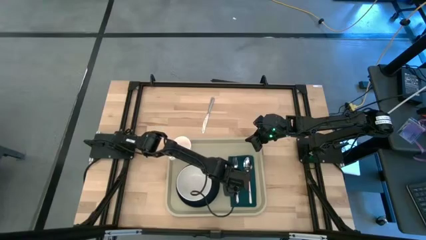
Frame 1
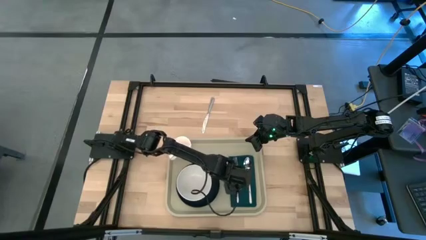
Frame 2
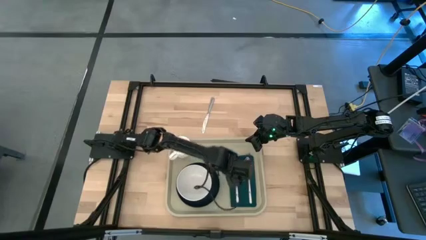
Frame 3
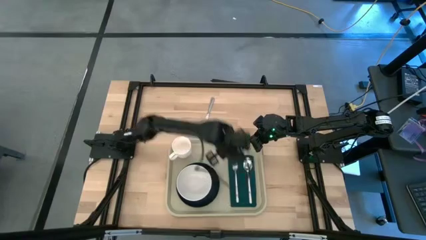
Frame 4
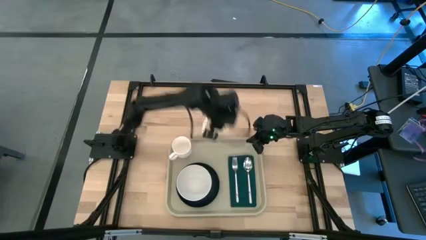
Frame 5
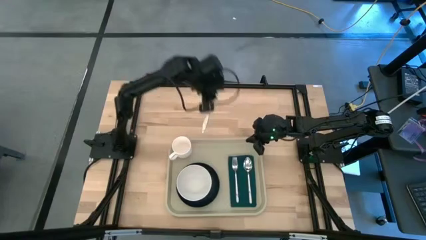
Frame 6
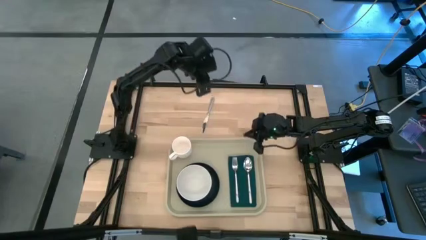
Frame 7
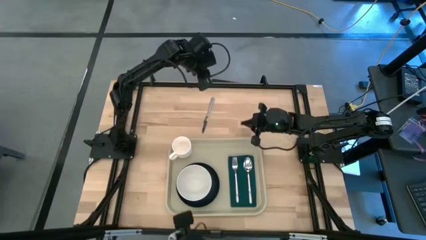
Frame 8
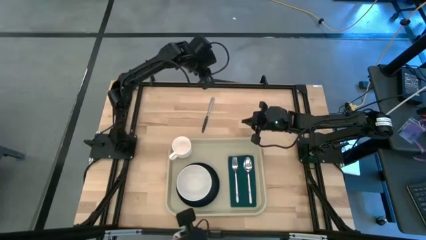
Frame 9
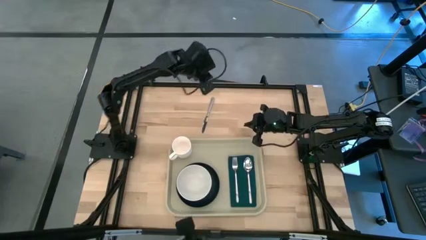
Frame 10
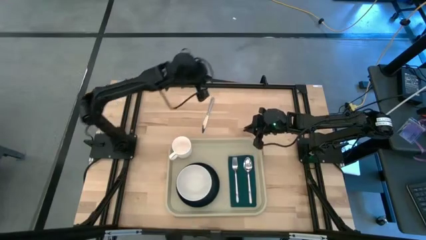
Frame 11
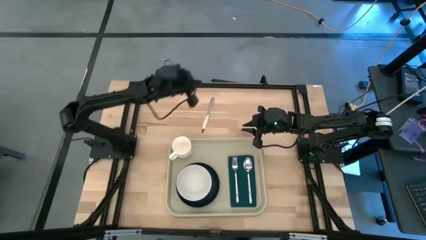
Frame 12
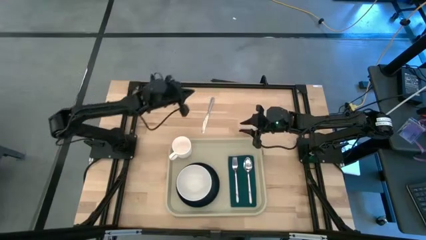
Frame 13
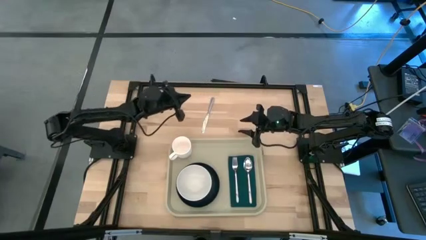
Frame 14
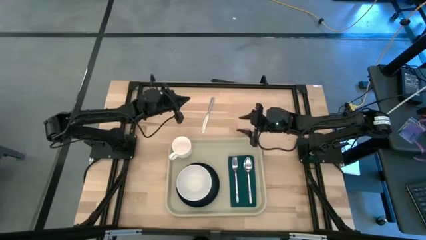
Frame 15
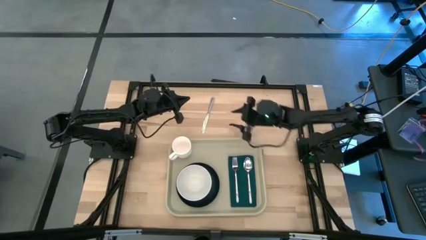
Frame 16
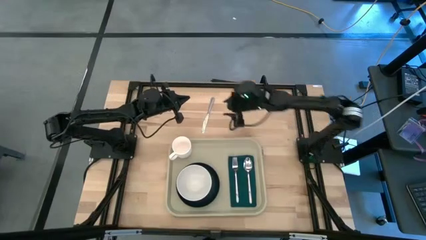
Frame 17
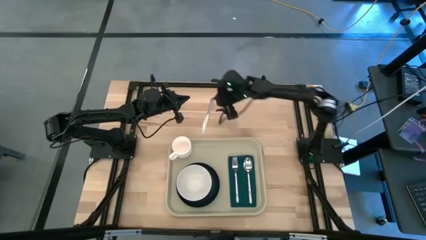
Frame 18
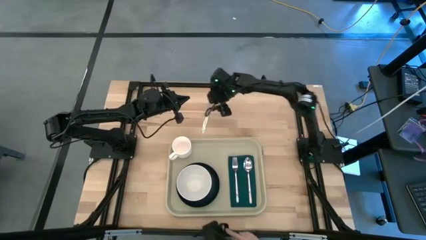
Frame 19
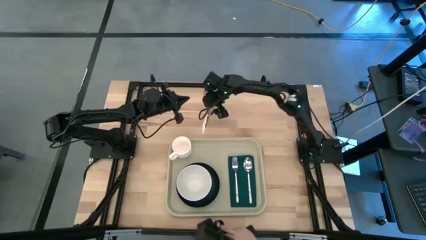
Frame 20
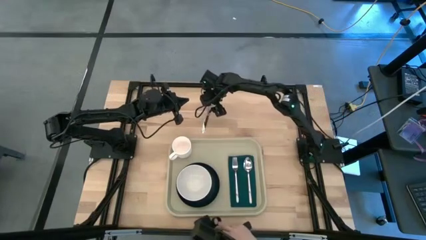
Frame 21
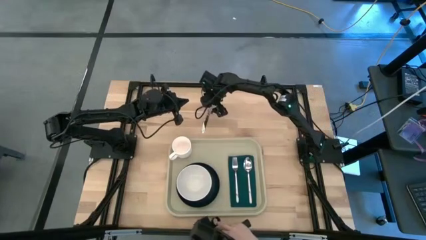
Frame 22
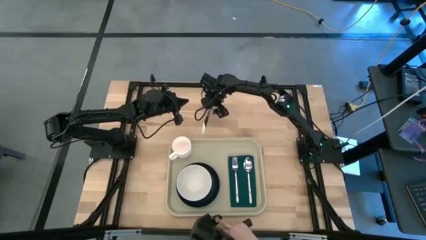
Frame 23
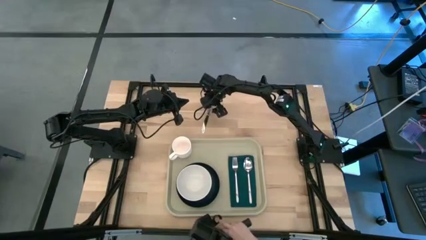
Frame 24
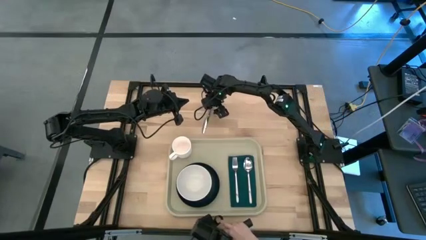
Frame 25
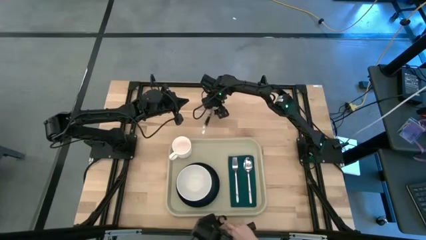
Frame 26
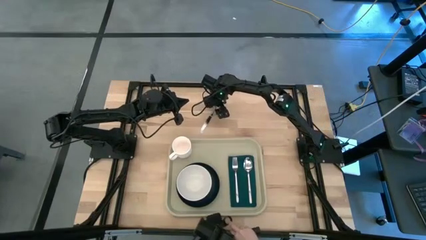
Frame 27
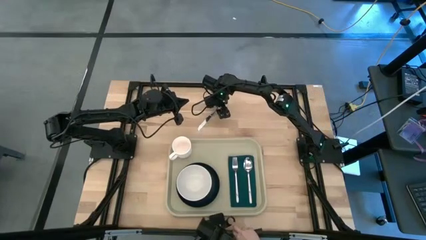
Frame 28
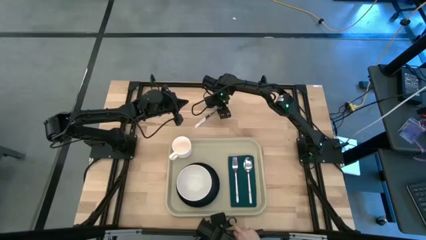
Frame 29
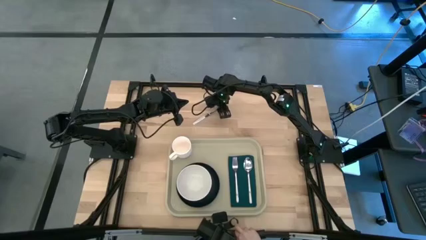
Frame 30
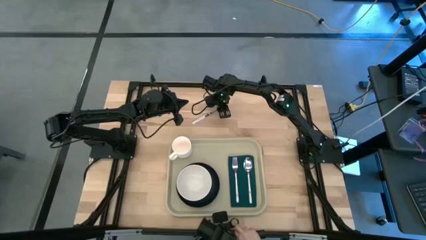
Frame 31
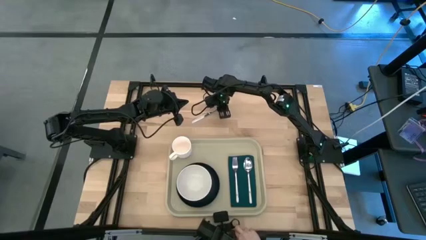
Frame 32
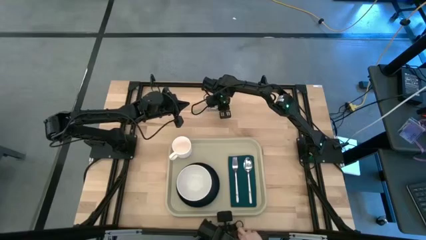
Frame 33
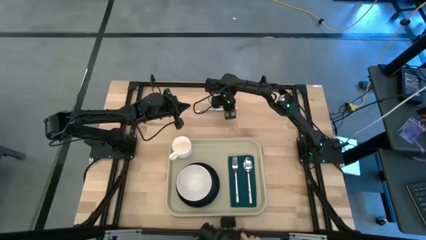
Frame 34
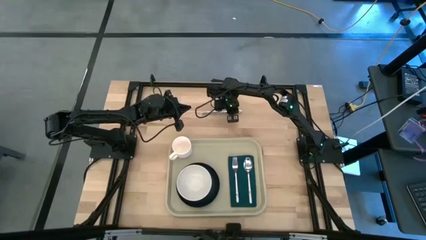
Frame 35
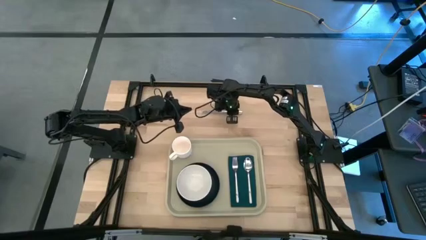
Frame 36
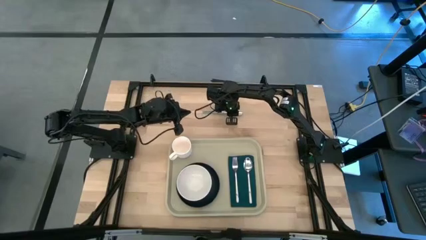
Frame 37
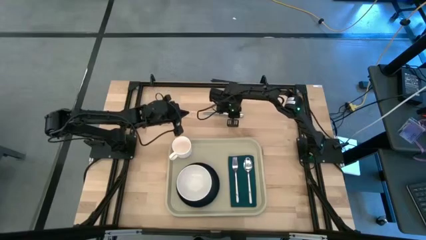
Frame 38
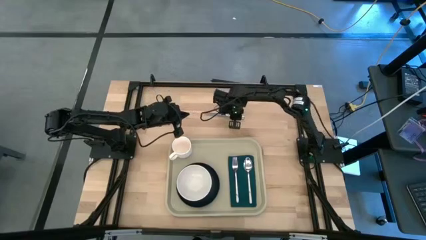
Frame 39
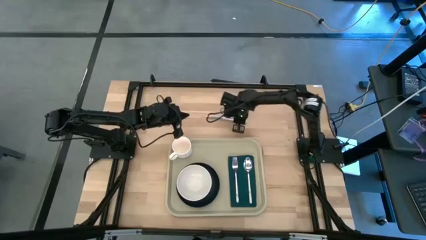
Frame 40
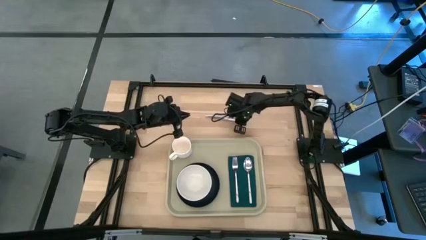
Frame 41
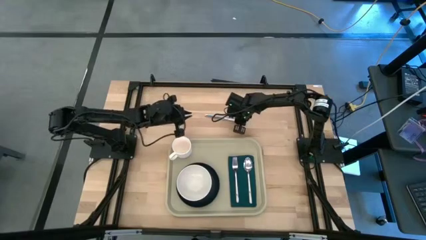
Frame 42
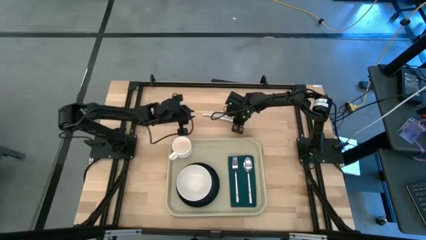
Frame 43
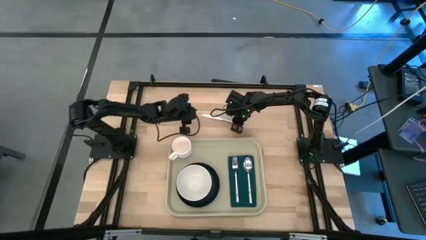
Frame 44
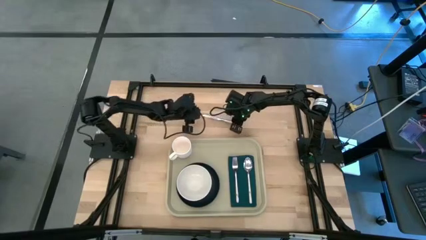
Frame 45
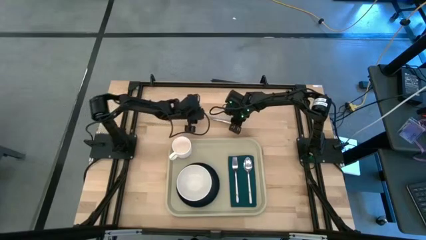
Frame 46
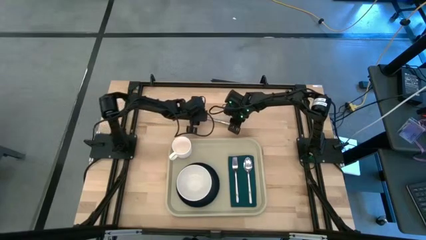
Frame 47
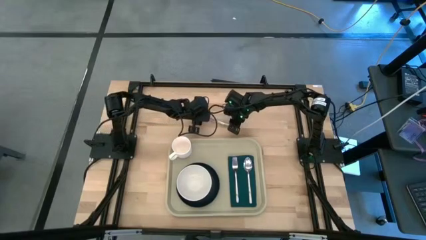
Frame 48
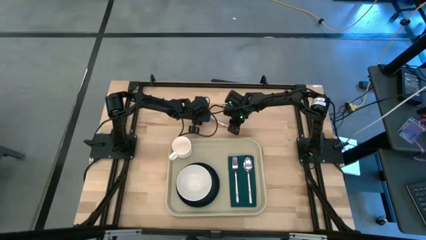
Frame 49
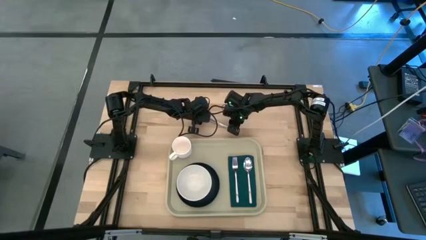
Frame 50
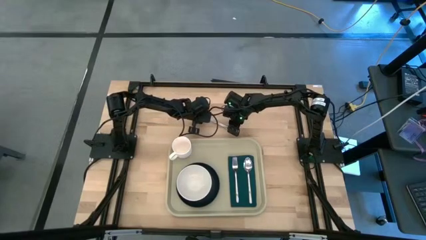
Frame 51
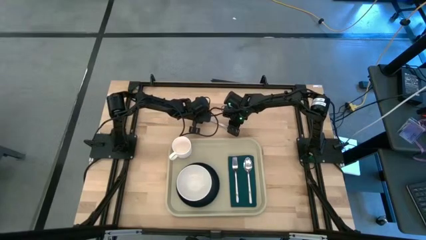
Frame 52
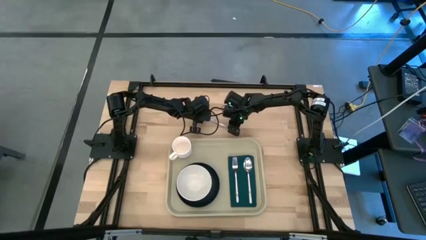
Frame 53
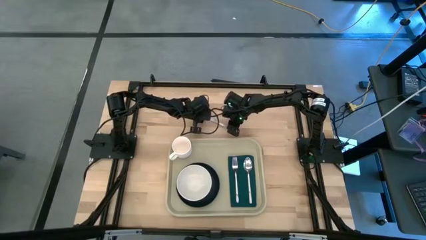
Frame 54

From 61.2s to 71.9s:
Task: Set up tray
Put the silver knife on the green napkin between the silver fork and spoon
